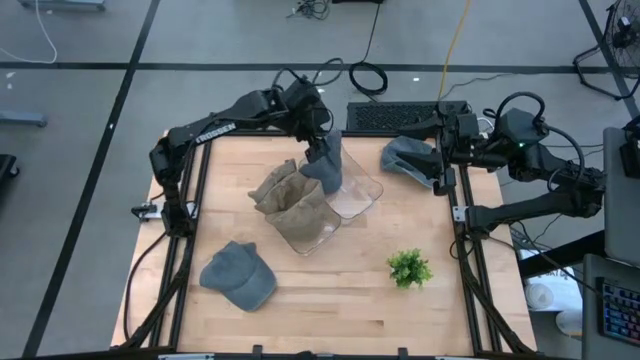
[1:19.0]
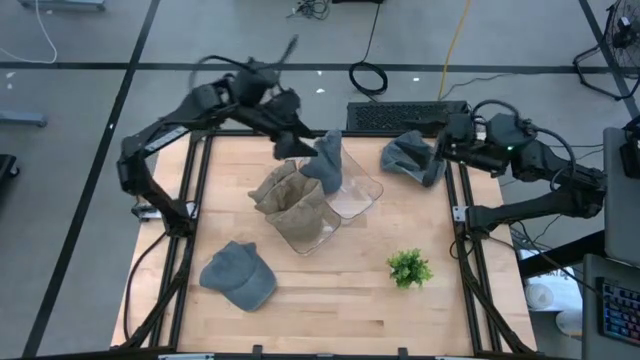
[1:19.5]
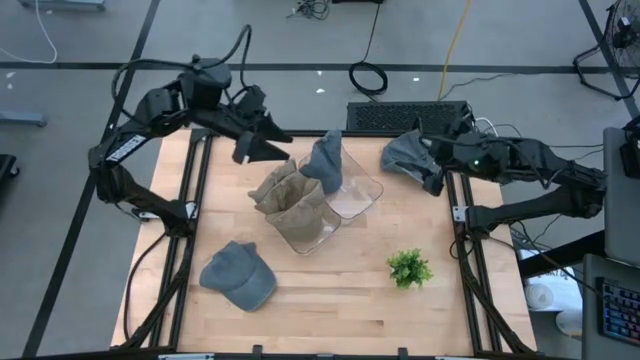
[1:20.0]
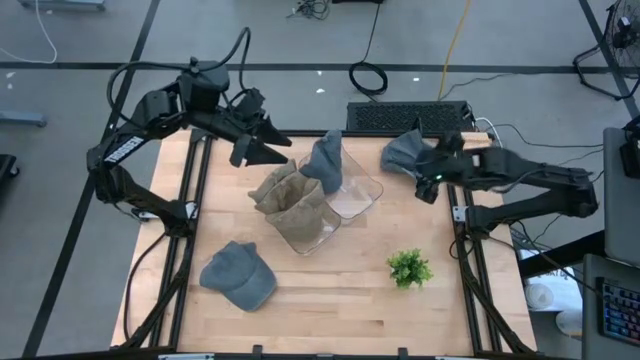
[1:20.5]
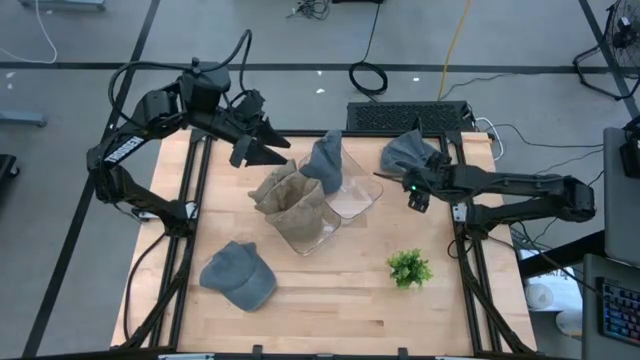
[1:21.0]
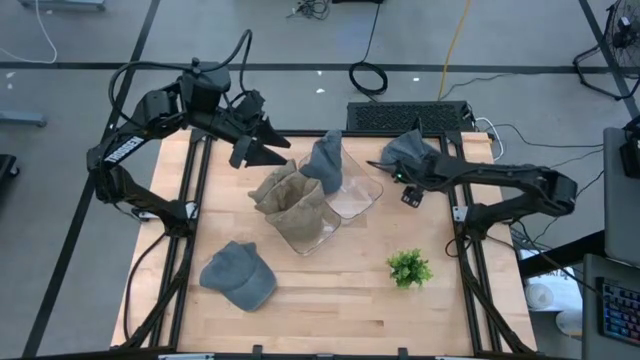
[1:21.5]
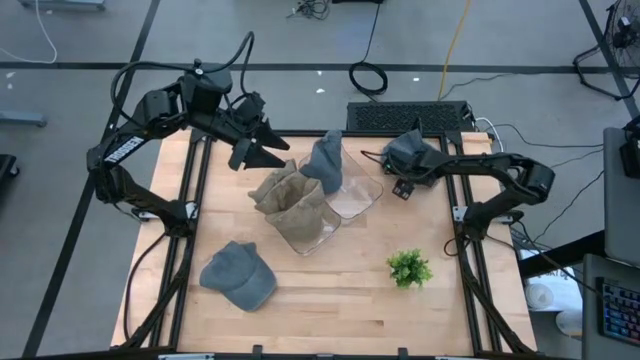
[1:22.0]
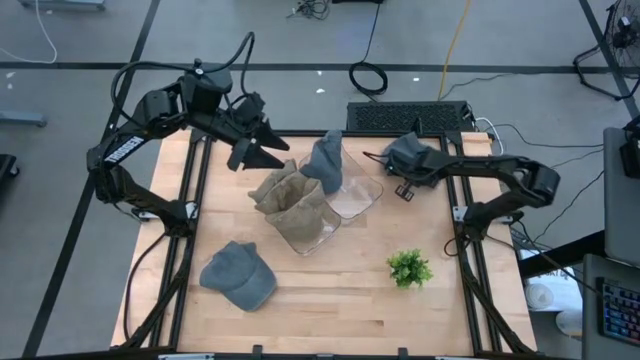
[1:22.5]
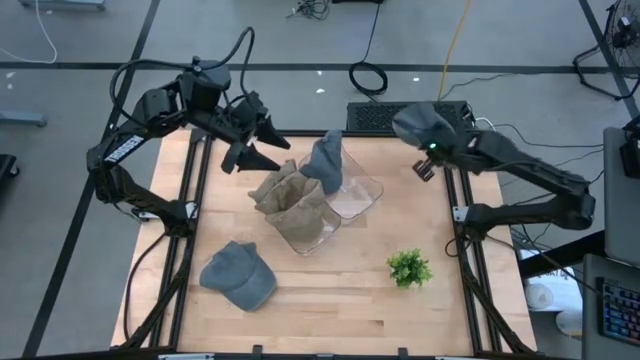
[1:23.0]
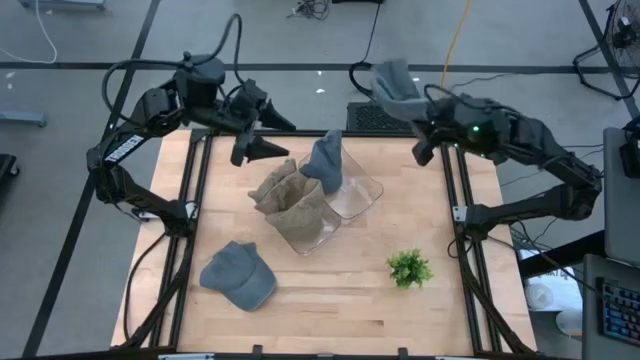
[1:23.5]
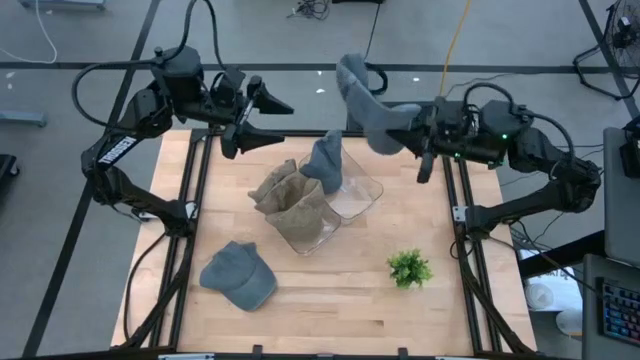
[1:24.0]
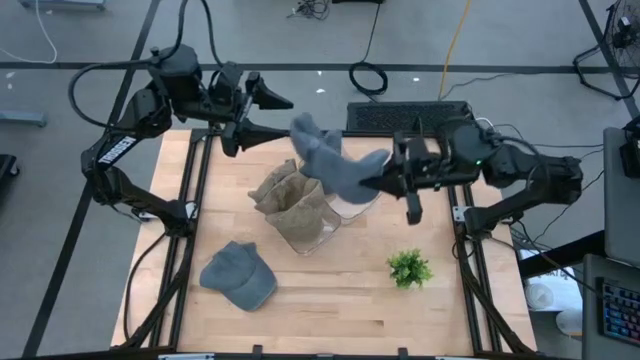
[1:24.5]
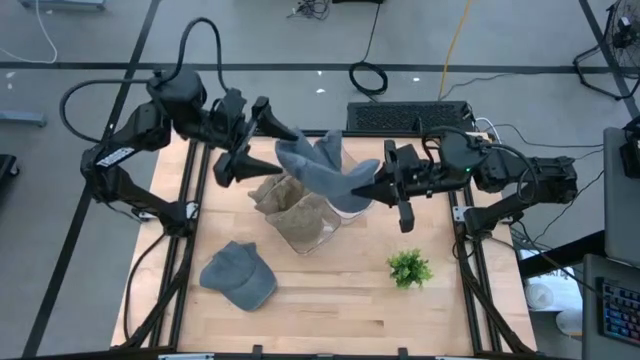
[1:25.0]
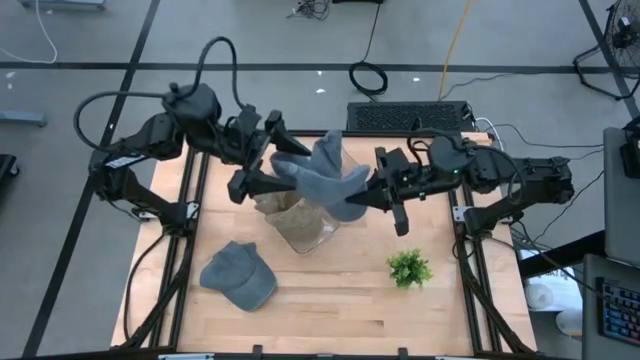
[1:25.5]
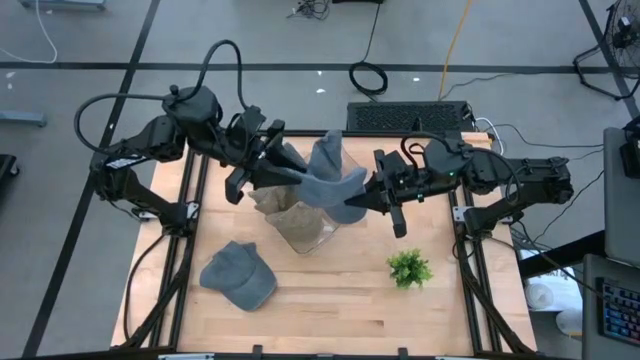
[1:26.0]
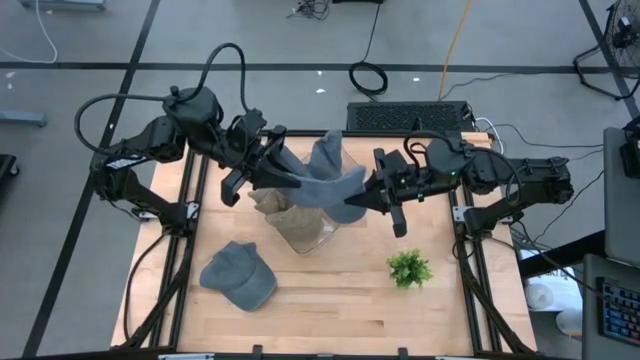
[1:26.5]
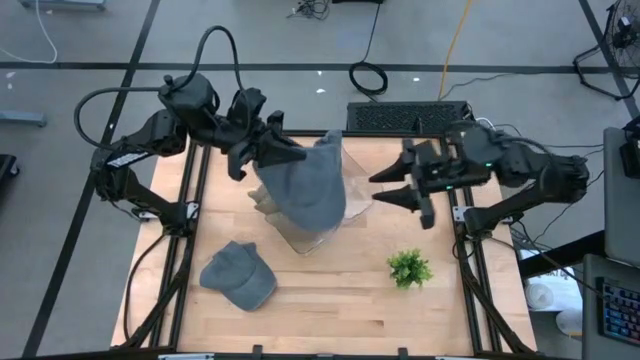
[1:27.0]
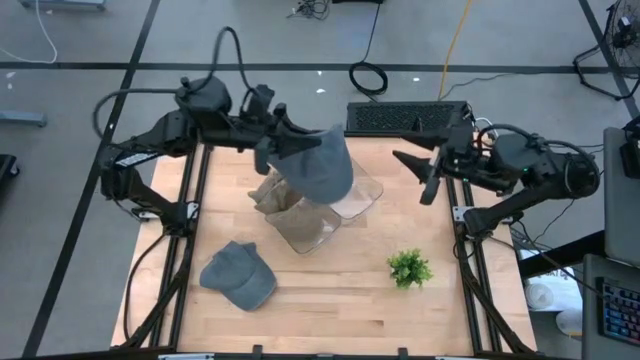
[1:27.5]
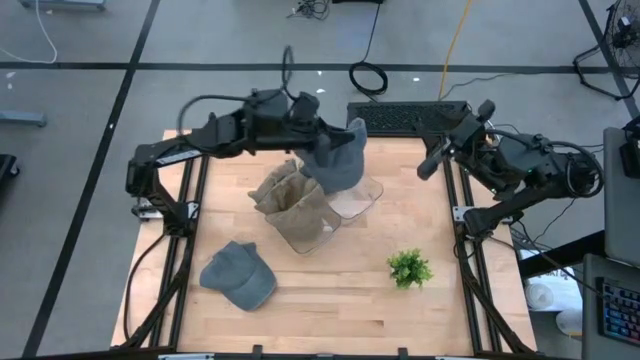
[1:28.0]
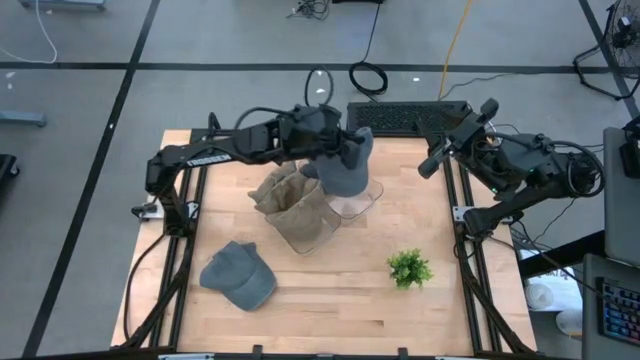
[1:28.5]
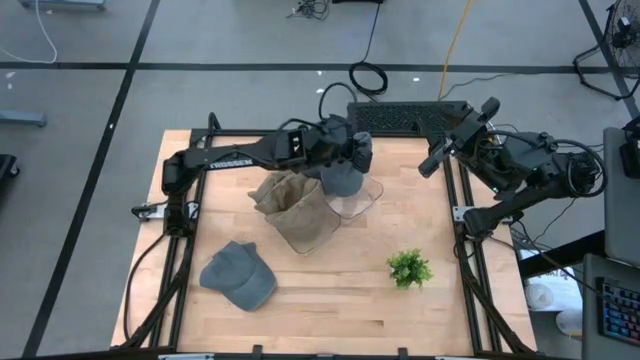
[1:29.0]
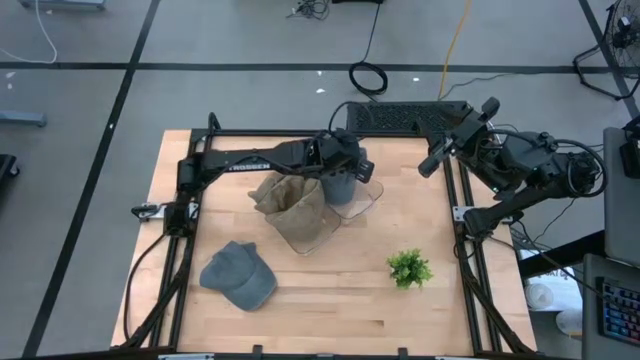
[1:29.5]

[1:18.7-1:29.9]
Task: Pick & Place hat
Put the top blue cap into the right transparent bin

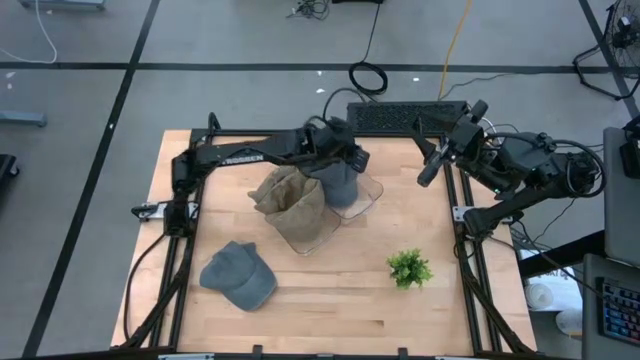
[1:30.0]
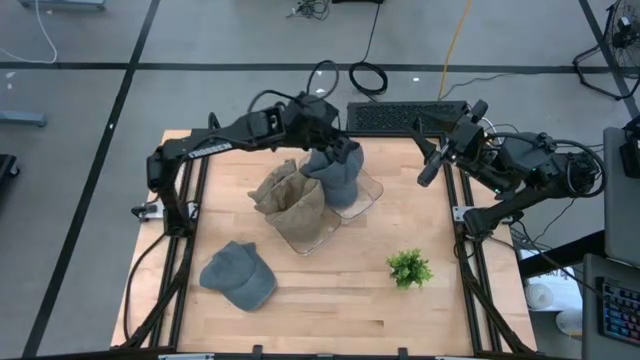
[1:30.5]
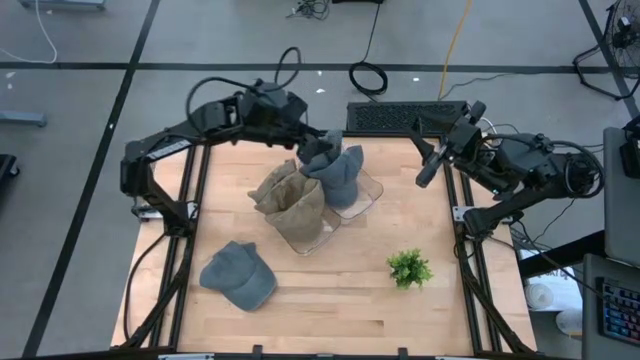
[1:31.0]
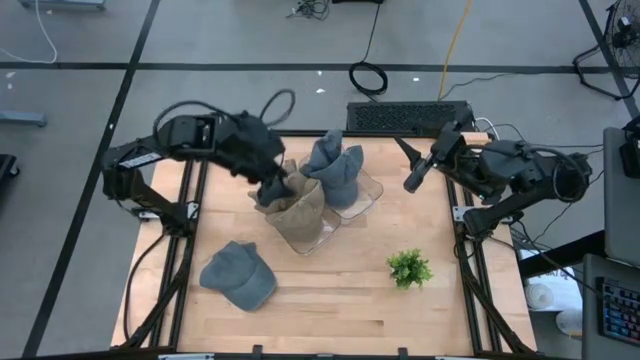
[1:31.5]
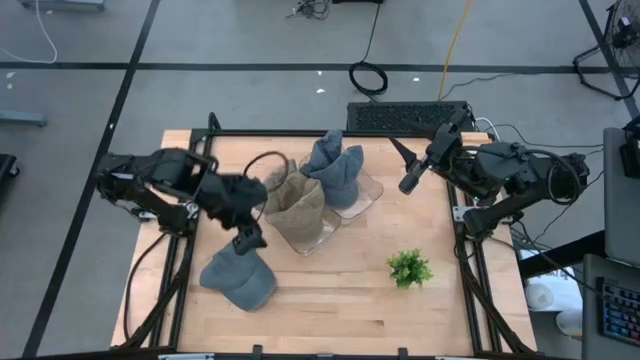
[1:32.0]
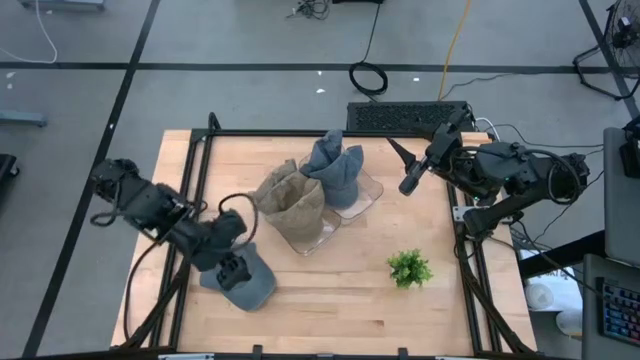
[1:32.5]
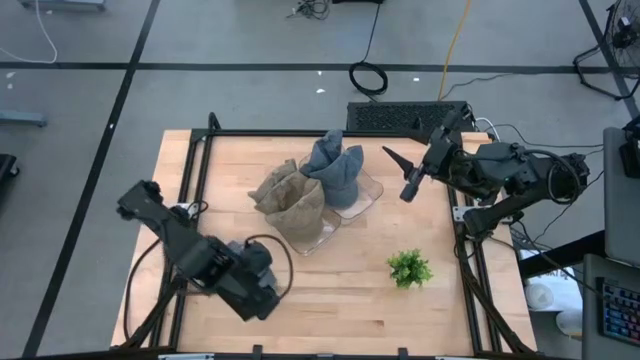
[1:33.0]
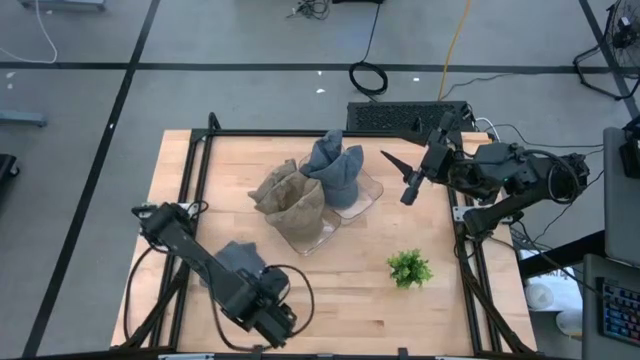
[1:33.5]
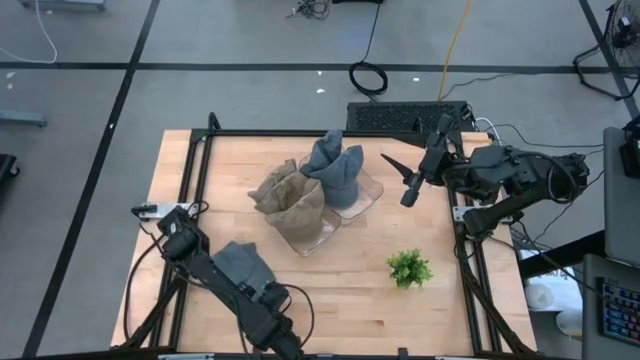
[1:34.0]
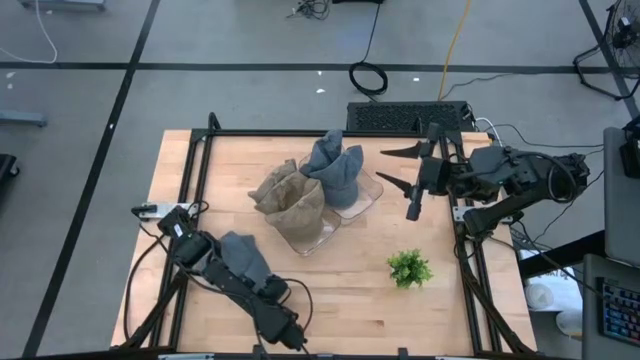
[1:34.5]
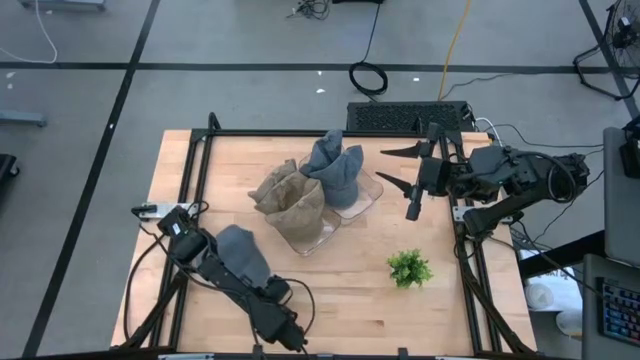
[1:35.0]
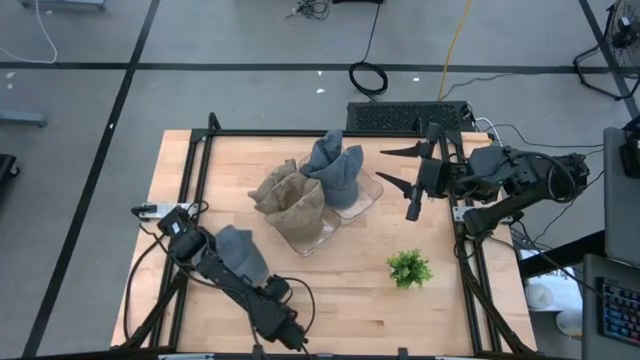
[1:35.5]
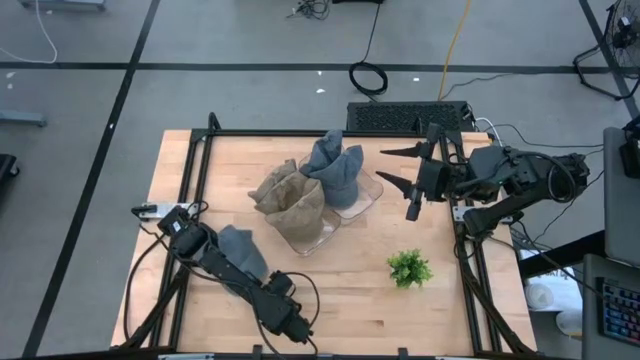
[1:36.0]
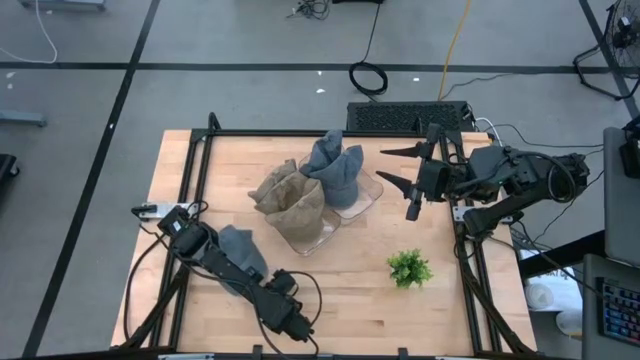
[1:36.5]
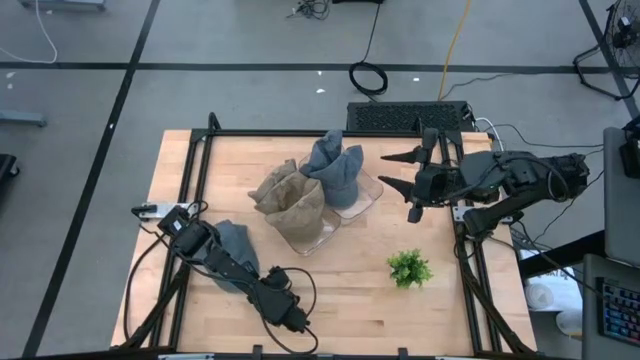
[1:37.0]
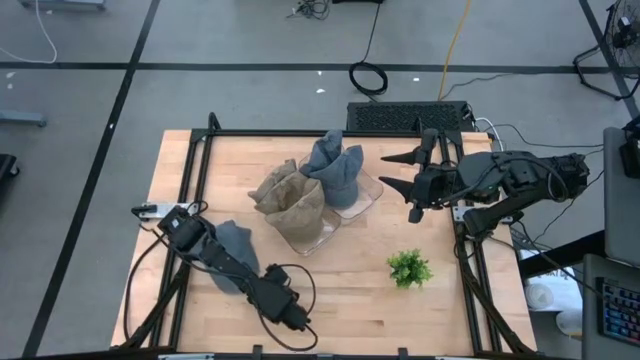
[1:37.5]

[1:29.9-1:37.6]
Put the blue cap into the right transparent bin

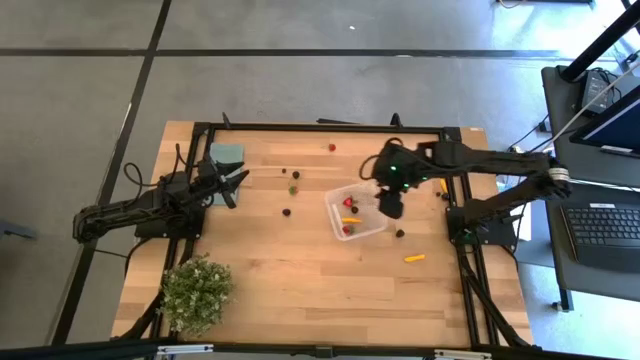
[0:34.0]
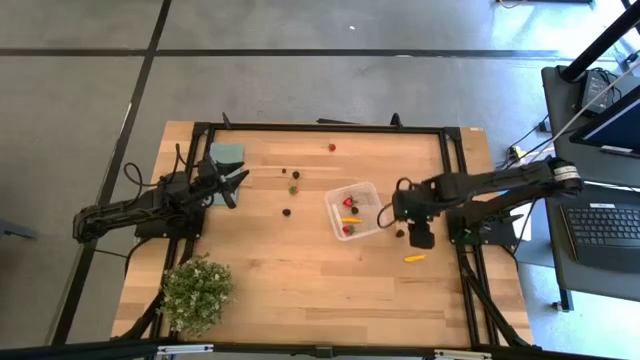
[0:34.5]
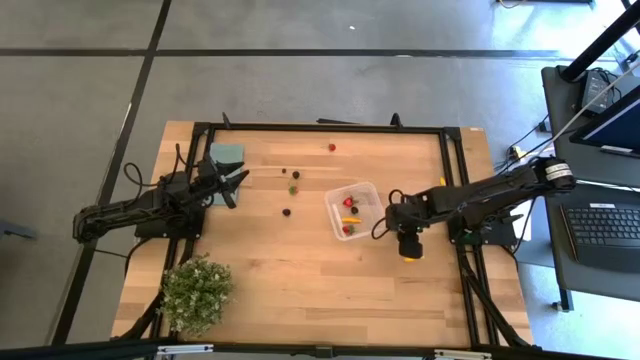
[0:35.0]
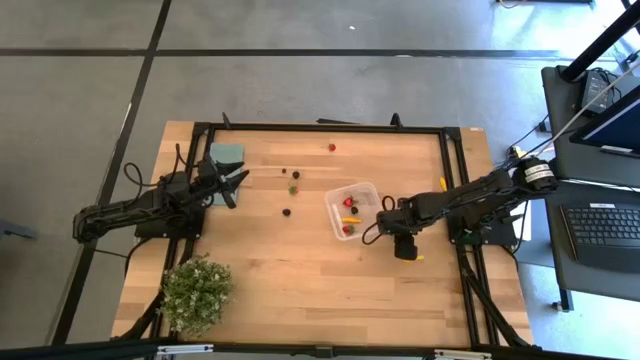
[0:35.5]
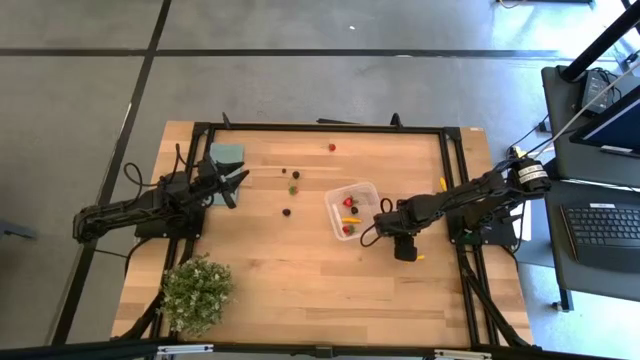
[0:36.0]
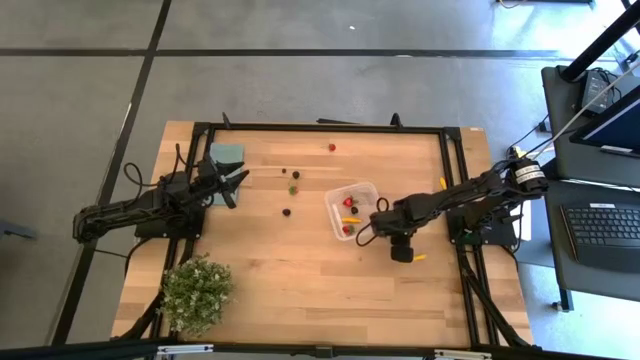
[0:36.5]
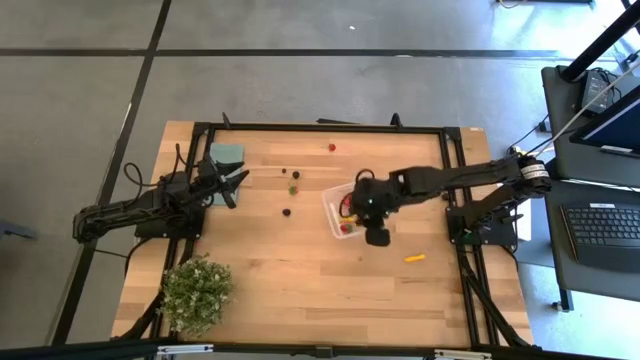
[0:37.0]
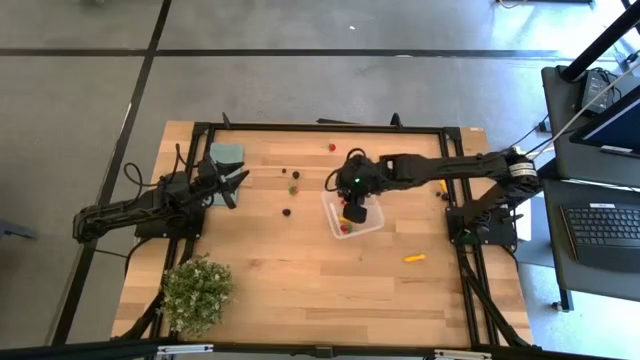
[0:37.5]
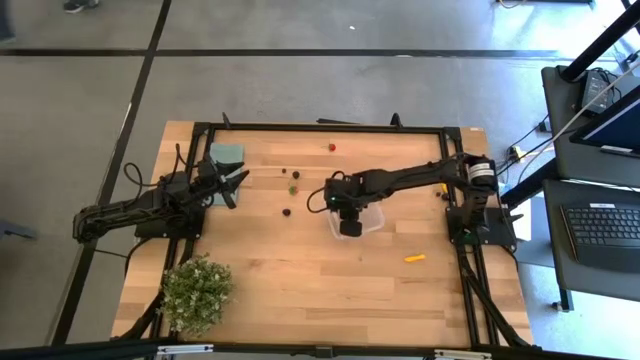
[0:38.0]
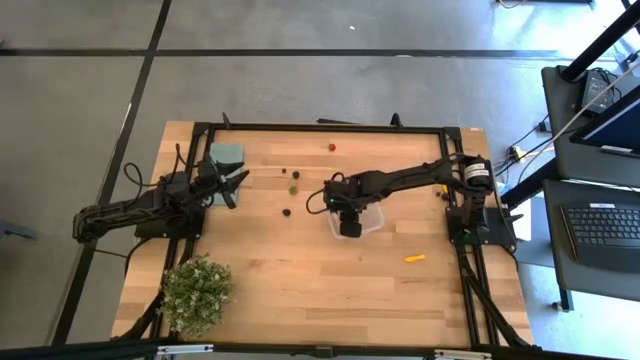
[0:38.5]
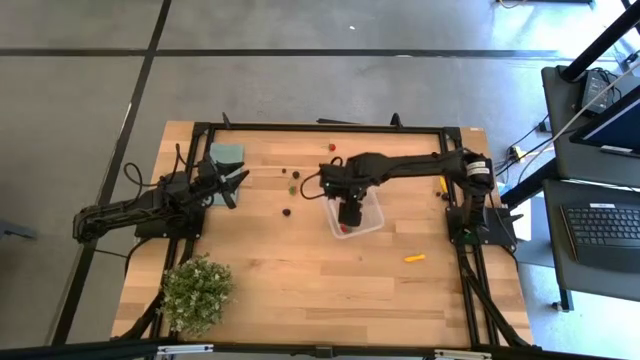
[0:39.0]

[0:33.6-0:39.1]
Task: Pick and placing Produce into tupperware
Put the bottom right blackberry into the transparent bin
